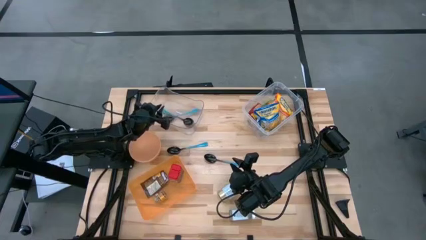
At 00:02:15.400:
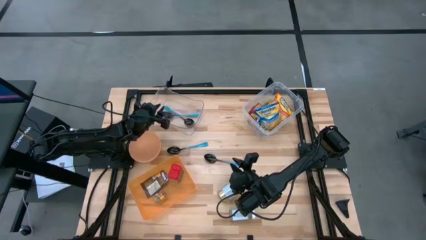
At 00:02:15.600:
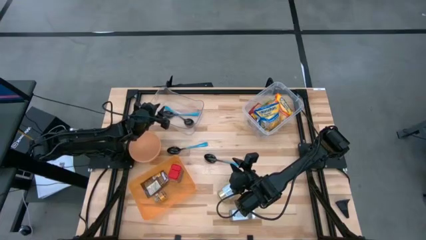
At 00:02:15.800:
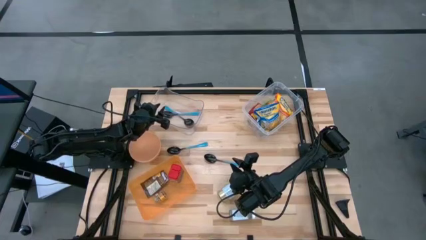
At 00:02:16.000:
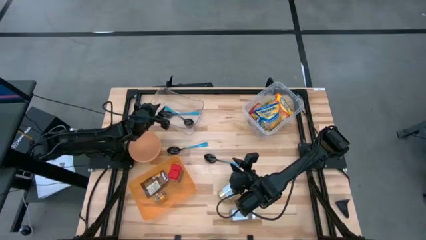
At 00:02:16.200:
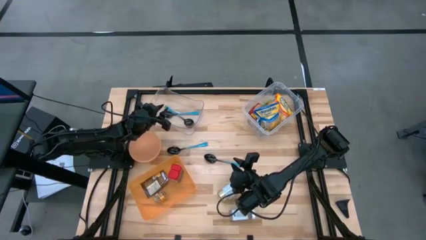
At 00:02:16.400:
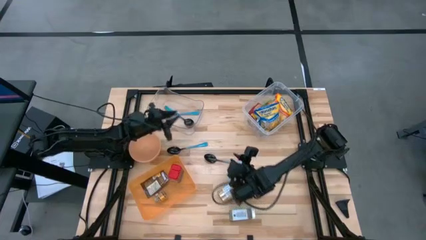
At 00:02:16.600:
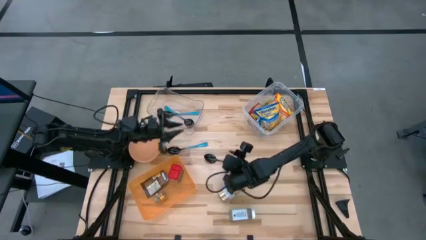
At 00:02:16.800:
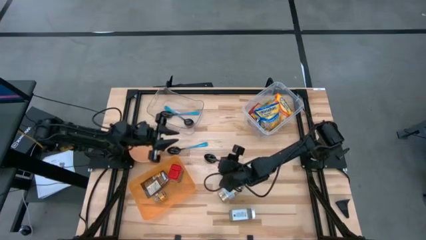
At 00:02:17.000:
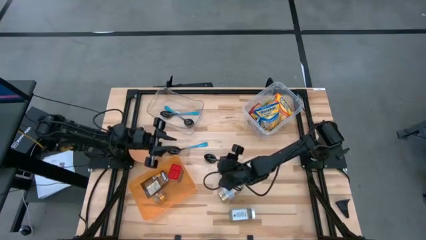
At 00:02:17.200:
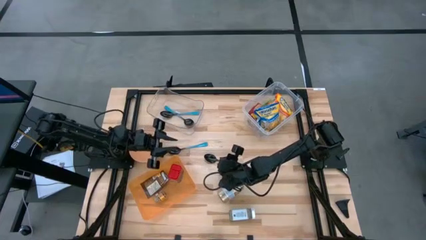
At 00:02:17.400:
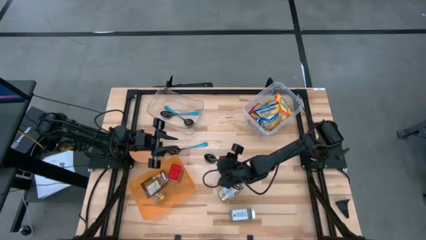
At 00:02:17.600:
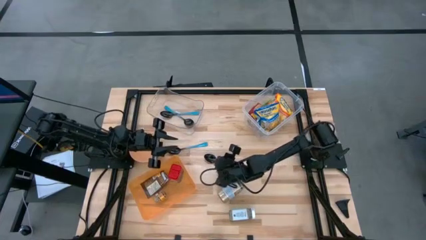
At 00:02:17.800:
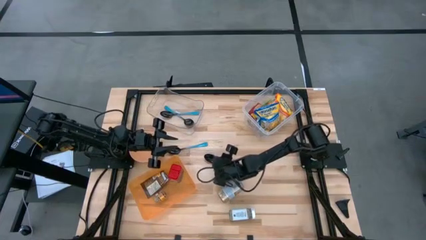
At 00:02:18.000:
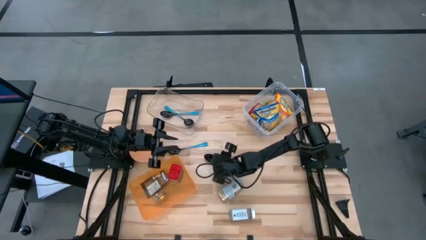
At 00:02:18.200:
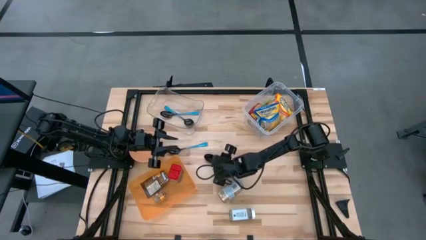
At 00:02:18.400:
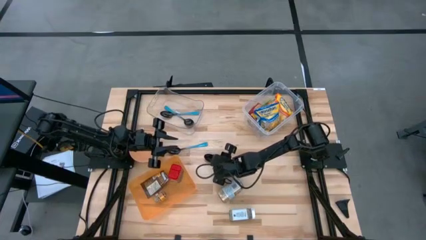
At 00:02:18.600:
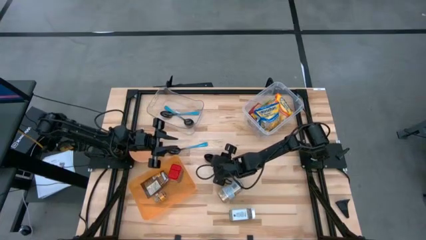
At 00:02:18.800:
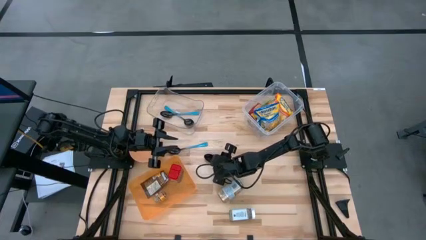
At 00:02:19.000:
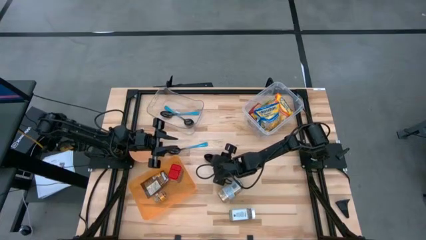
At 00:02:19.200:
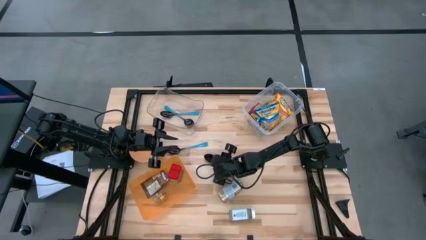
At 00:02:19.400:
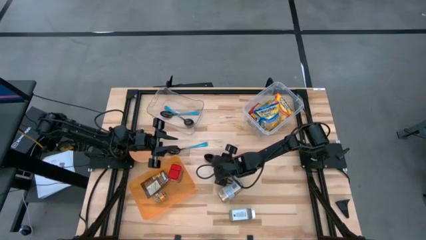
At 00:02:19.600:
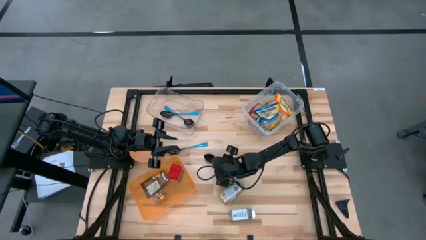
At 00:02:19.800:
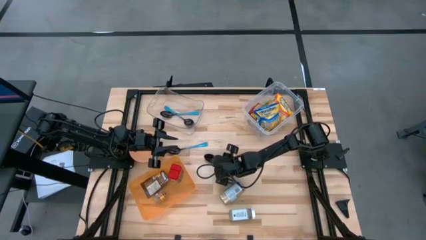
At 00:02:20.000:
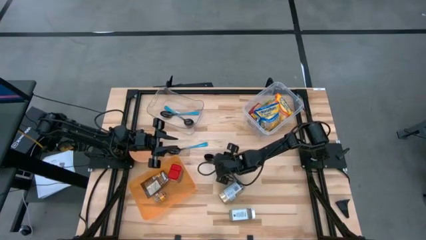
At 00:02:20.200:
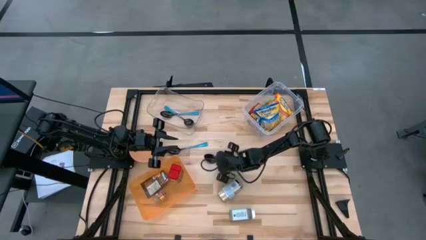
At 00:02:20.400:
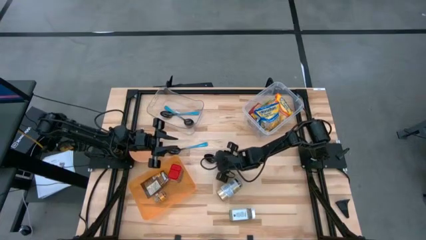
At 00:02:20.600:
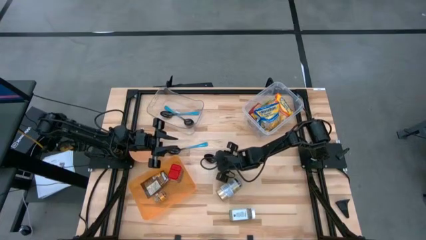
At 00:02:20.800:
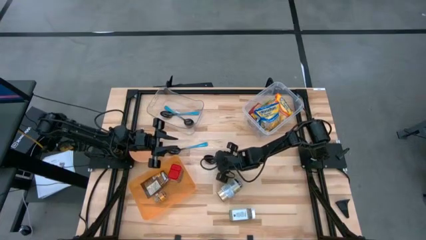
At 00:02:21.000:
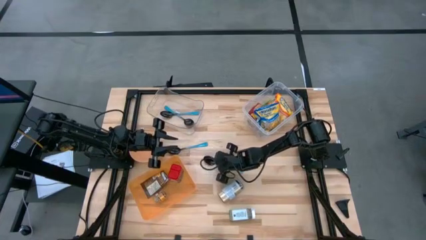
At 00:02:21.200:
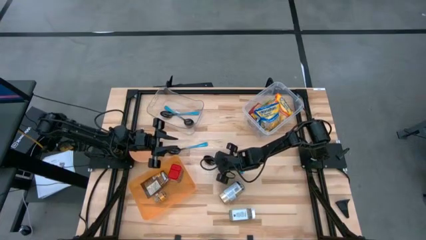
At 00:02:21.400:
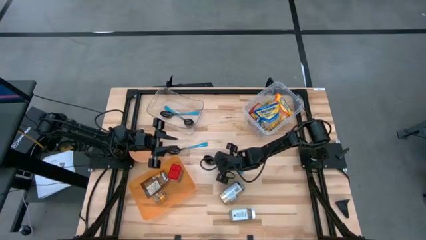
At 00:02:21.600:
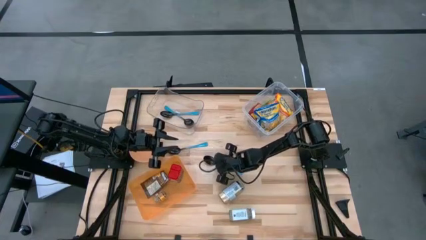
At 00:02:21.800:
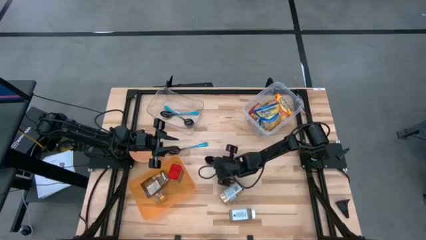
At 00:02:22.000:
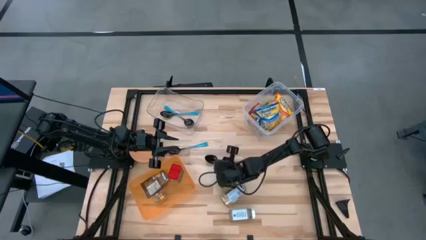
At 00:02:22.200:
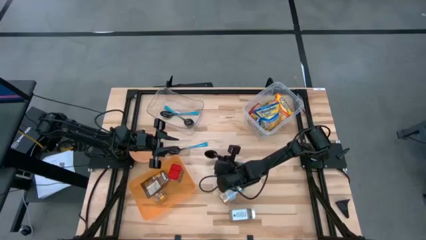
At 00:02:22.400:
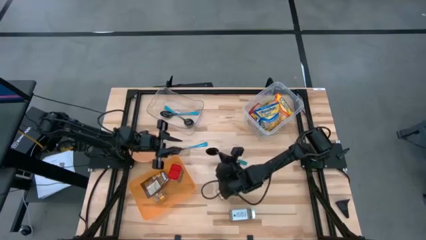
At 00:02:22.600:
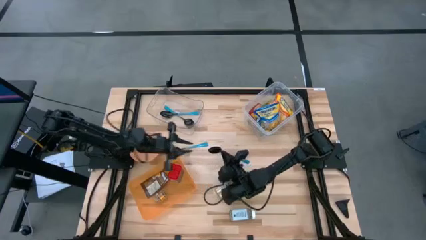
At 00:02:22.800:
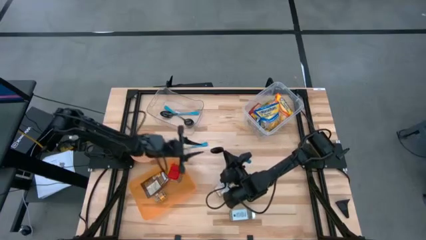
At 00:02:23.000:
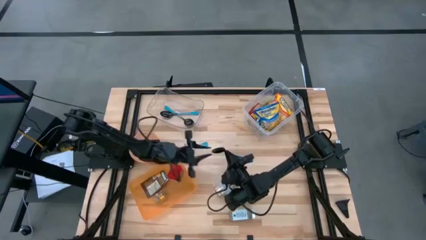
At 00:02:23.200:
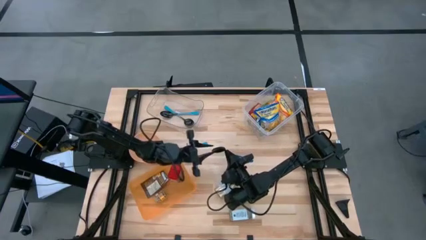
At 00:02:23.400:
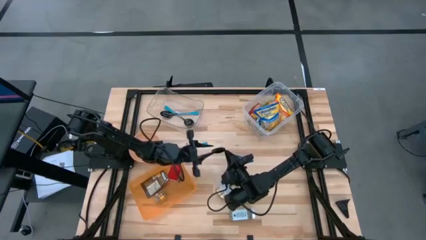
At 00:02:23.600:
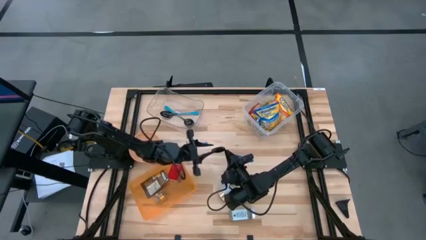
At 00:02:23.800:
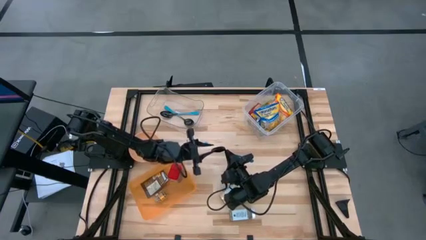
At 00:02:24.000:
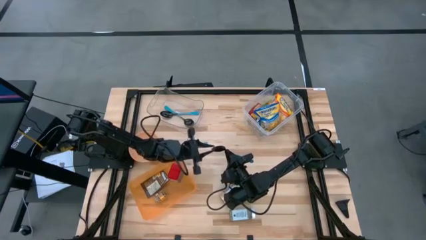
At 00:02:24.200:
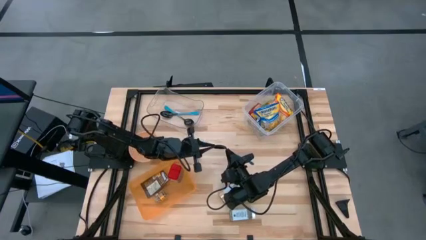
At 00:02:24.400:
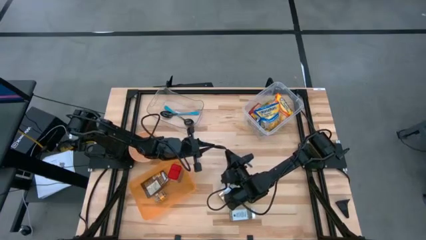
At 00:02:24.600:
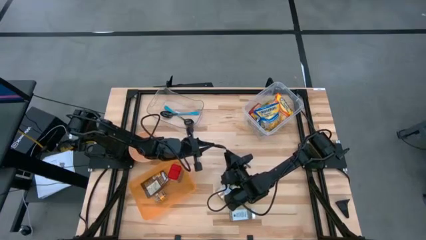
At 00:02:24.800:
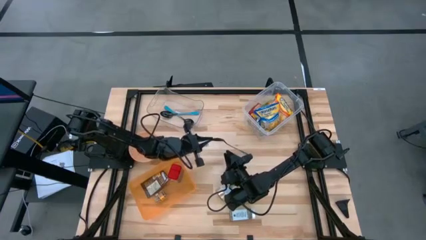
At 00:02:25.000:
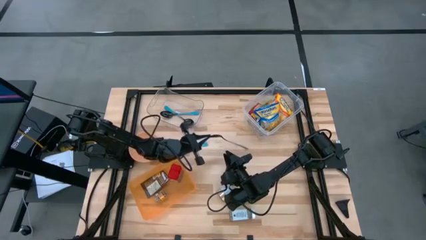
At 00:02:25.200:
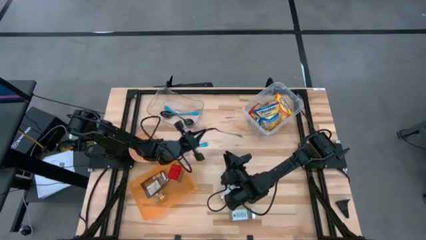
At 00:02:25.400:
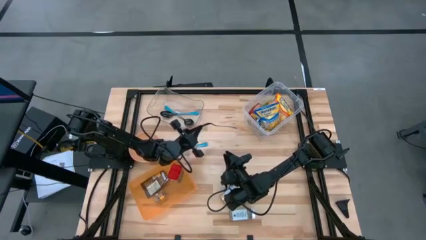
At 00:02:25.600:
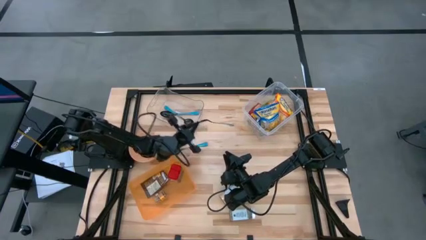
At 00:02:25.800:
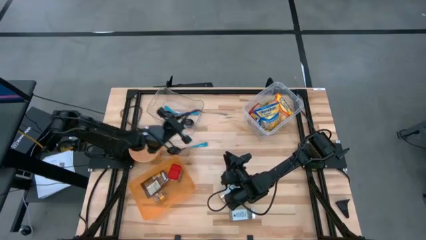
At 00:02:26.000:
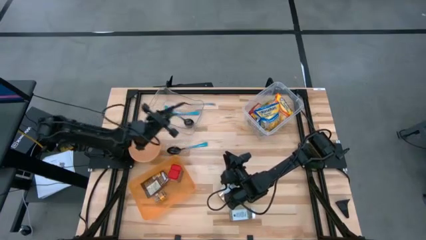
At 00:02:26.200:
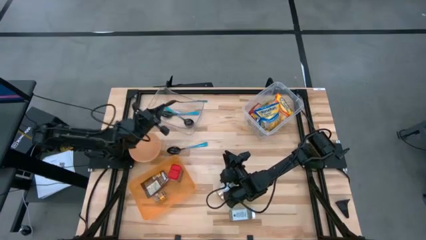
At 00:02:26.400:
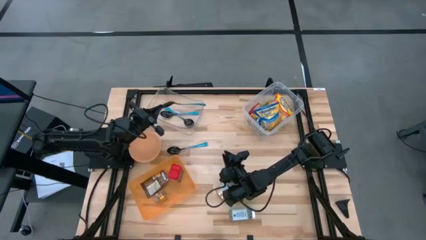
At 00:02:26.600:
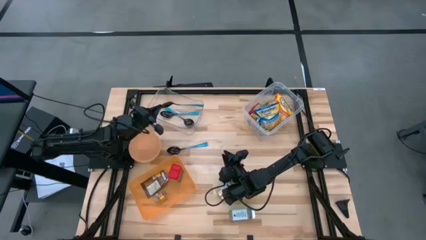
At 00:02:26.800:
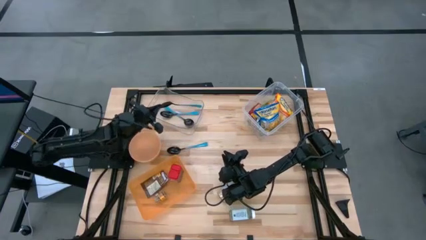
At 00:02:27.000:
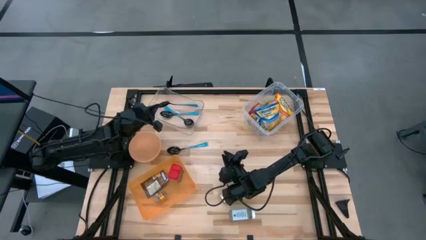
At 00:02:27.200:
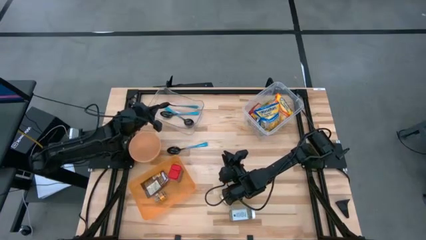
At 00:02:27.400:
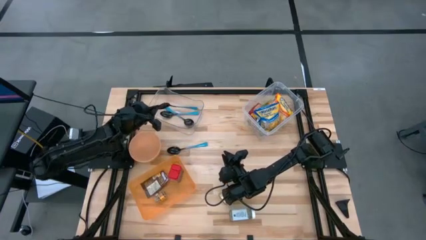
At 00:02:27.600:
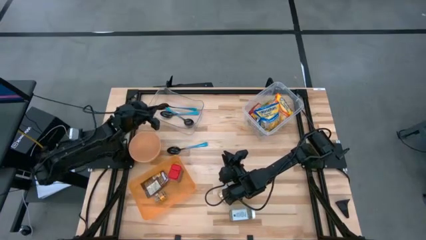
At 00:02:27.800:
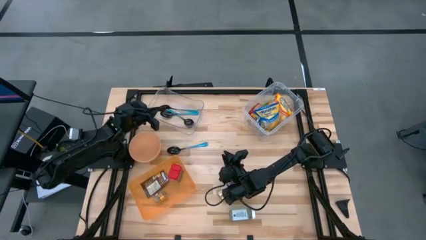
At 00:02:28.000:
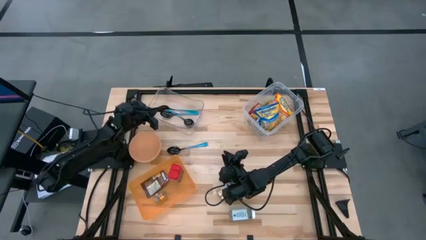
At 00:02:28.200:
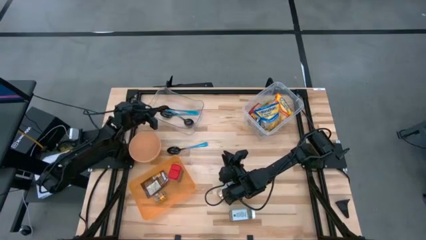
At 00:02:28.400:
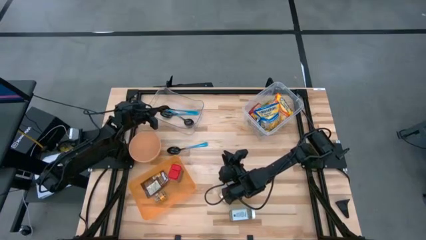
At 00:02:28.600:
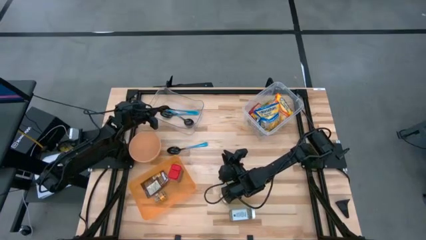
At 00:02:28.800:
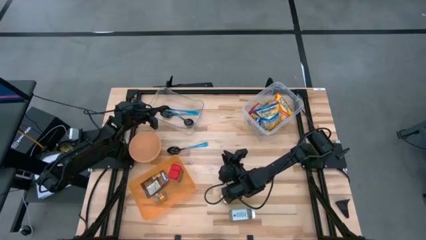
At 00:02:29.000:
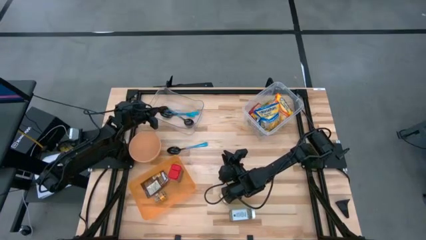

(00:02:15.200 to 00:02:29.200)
Task: Pick & Place Food Item
Put the blue spoon into the left transparent bin
